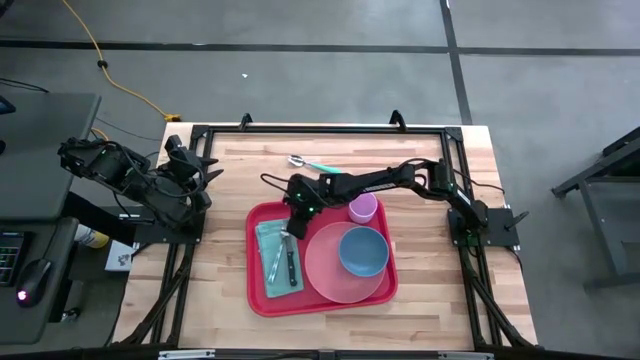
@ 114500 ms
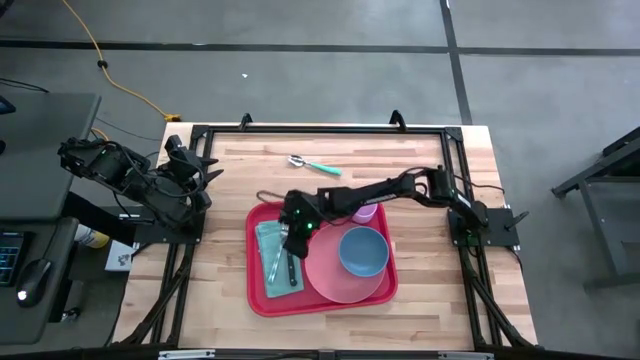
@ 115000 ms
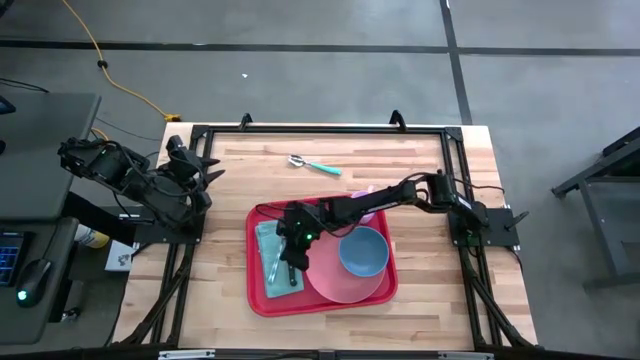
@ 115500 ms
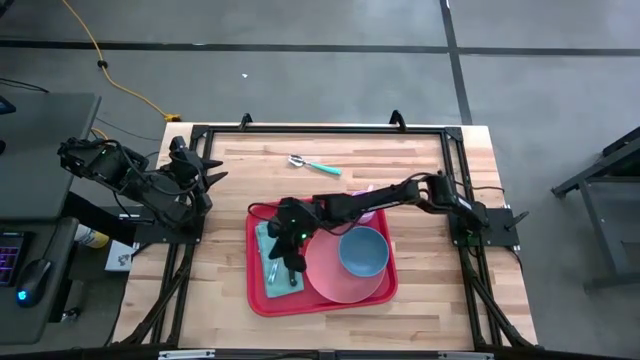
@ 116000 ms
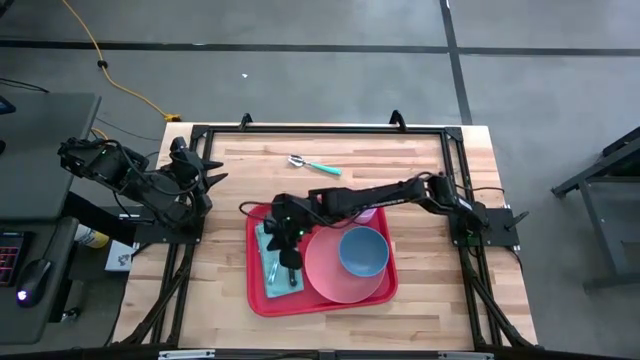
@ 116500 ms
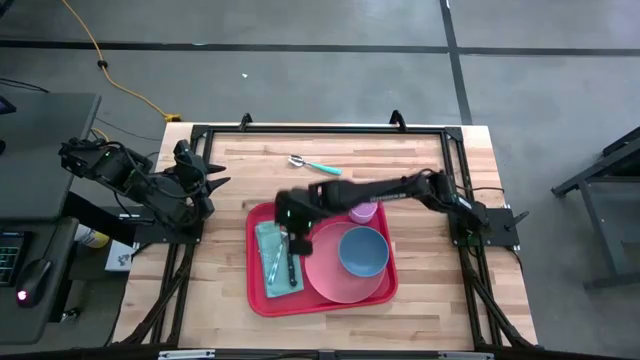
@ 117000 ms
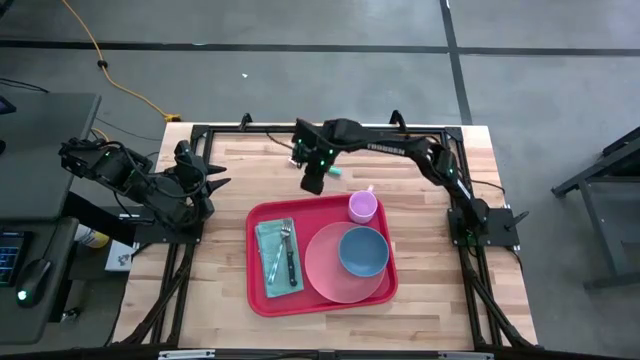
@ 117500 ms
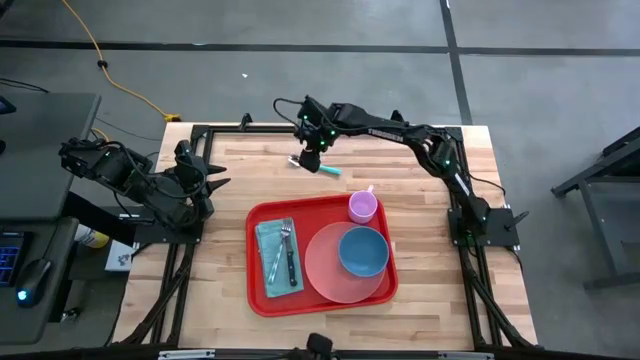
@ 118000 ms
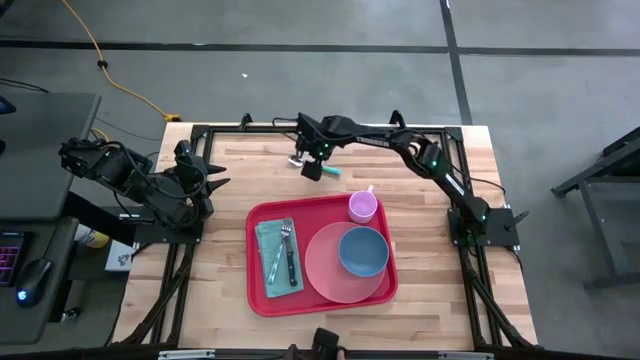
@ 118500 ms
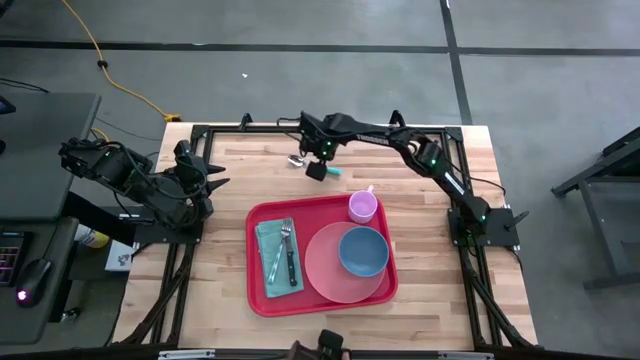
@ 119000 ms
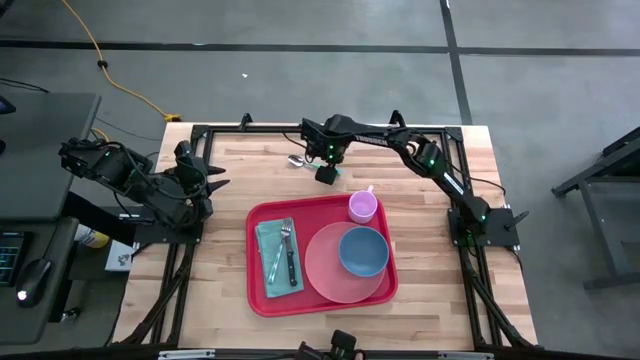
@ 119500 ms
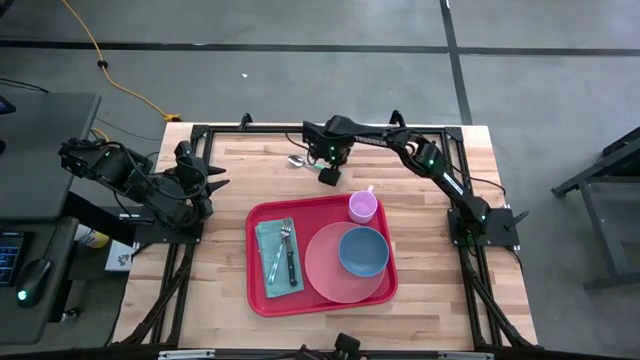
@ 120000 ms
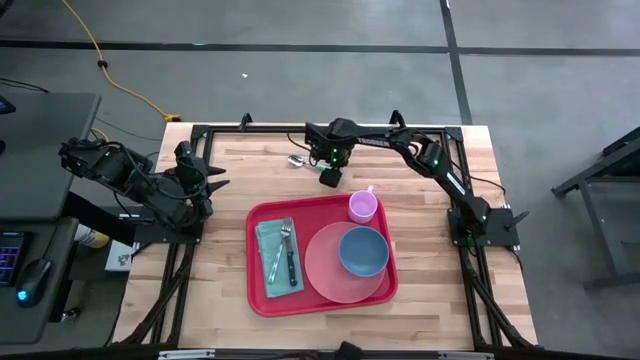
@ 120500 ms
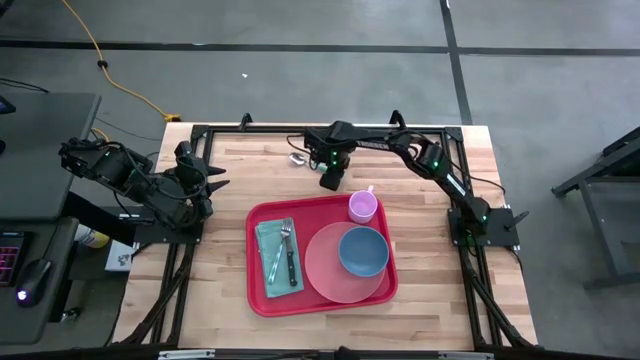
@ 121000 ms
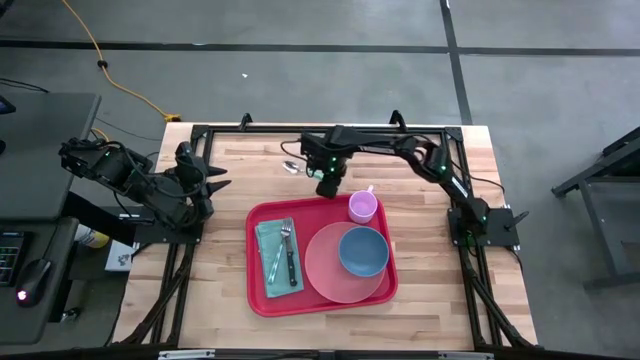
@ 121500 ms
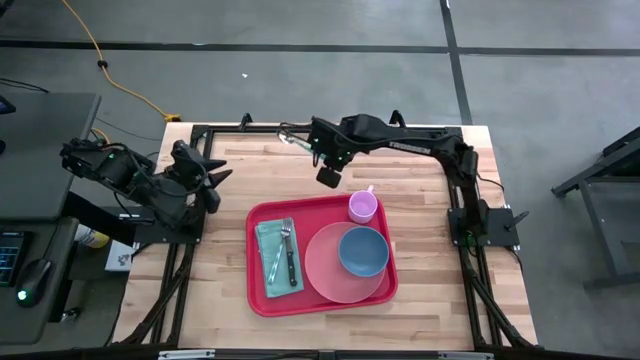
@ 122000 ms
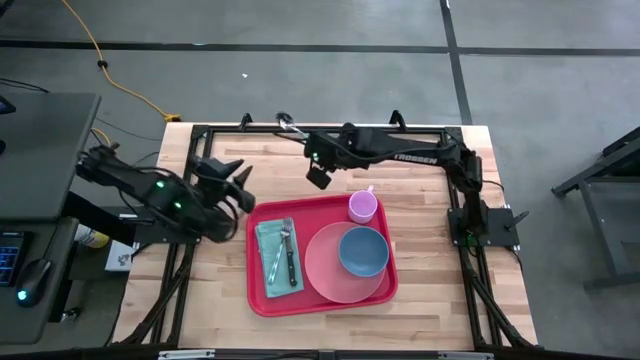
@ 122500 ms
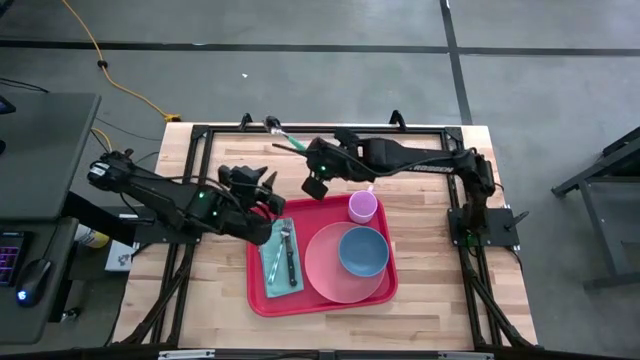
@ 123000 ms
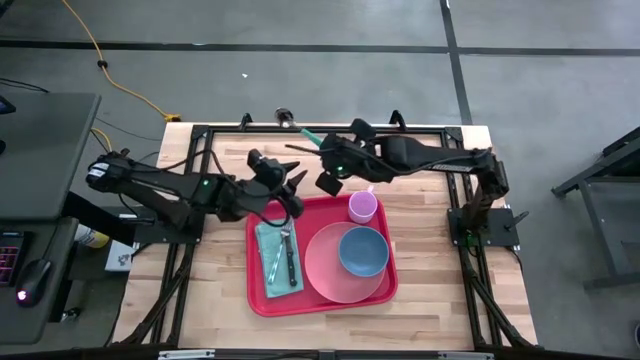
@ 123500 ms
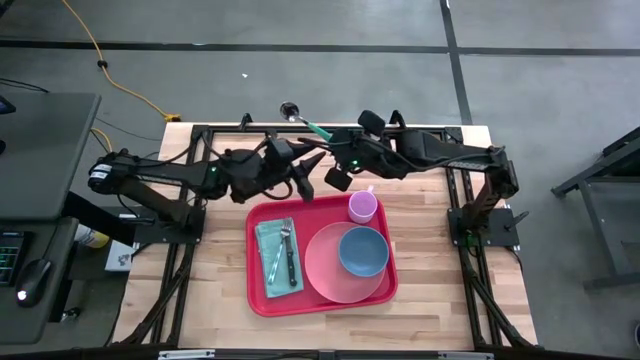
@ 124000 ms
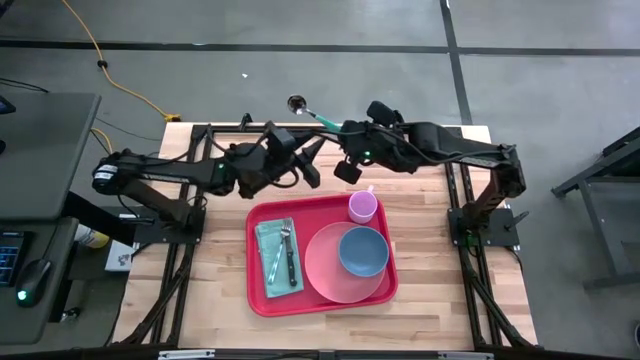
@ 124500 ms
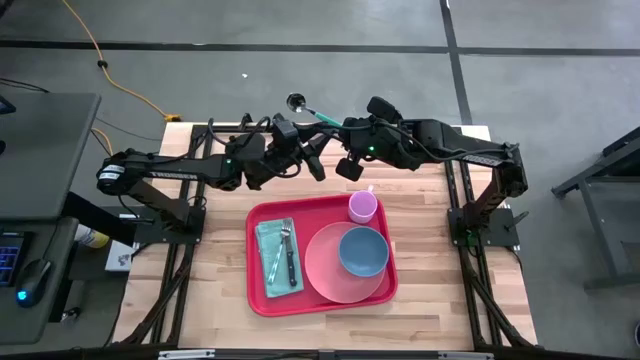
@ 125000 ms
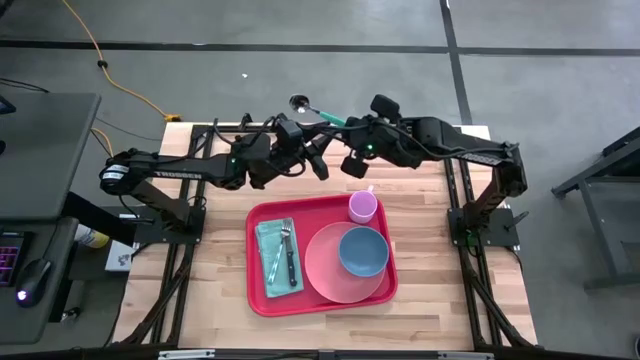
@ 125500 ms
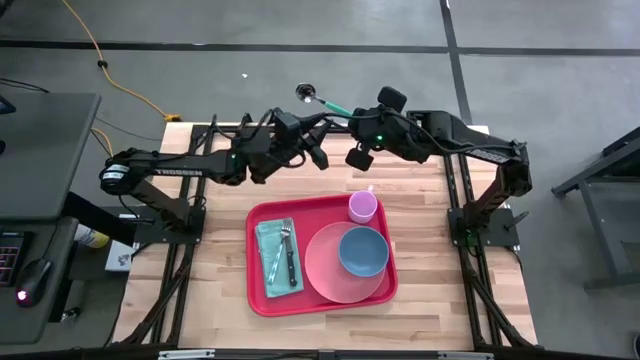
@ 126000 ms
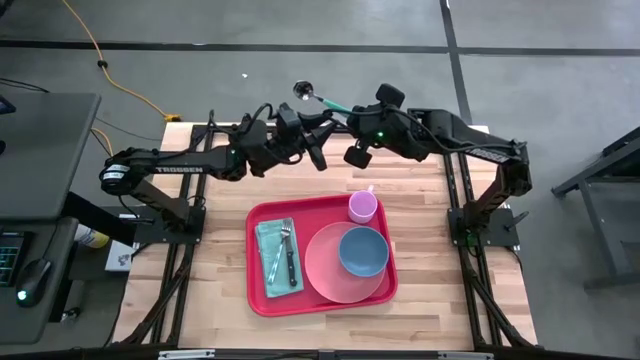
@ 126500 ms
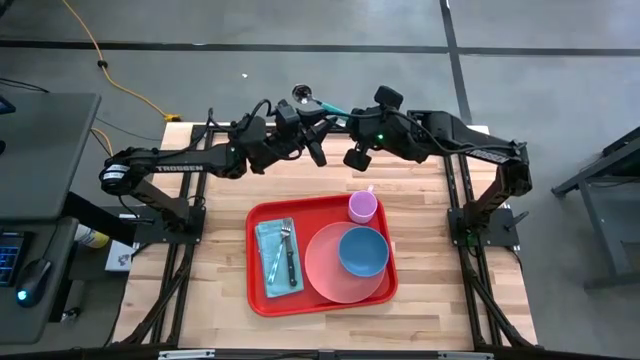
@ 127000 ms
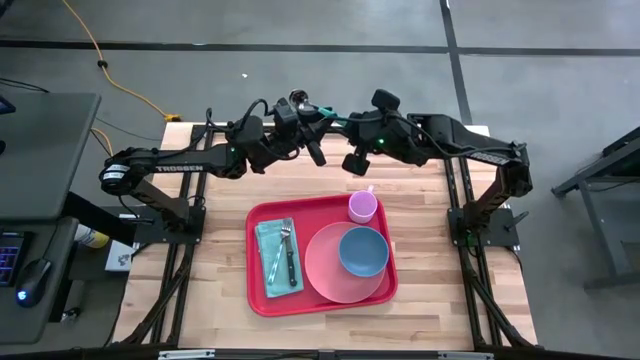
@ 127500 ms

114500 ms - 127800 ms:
Task: Set up tray
Put the blue spoon on the blue napkin to the left of the blue fork

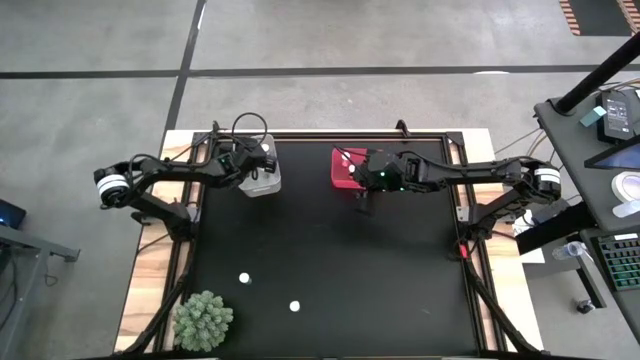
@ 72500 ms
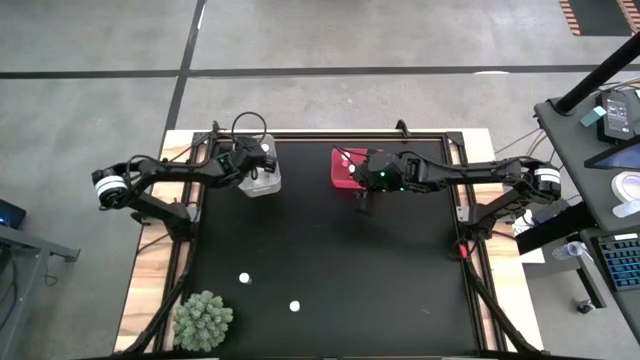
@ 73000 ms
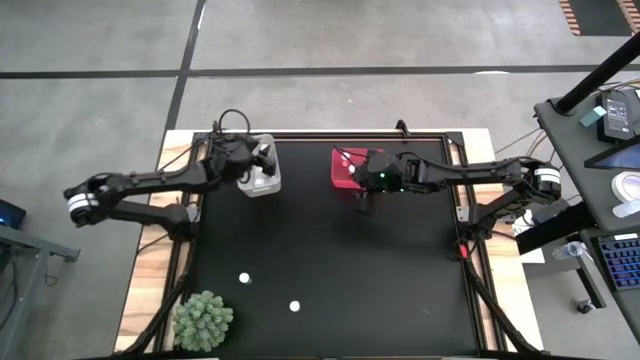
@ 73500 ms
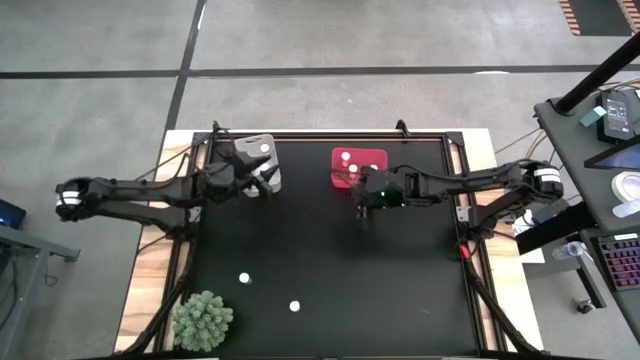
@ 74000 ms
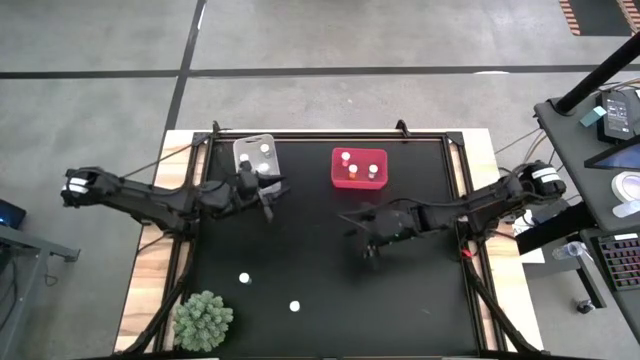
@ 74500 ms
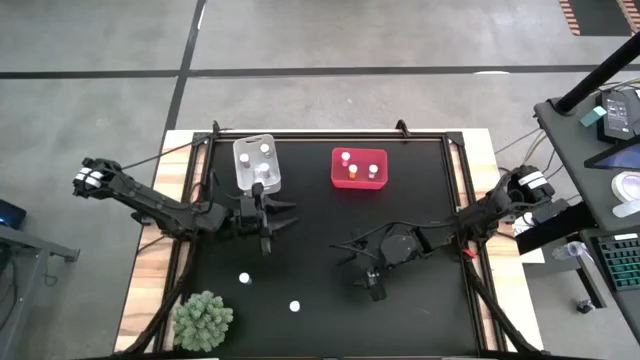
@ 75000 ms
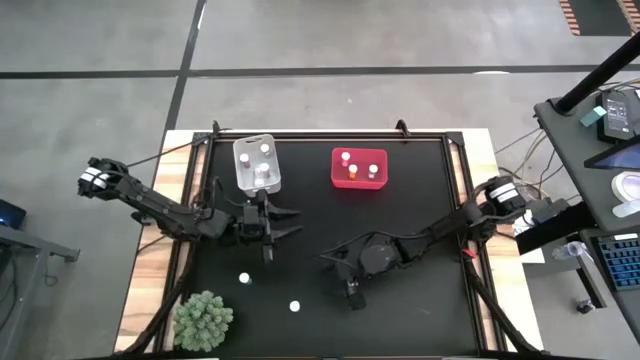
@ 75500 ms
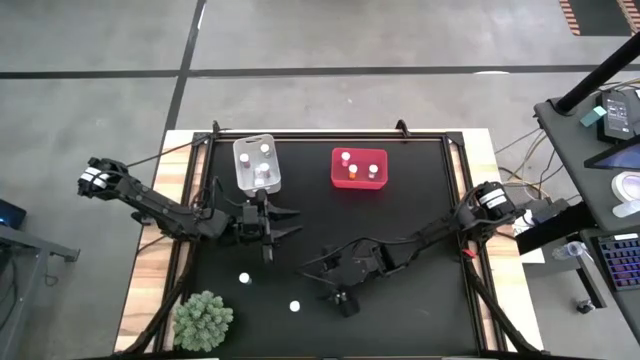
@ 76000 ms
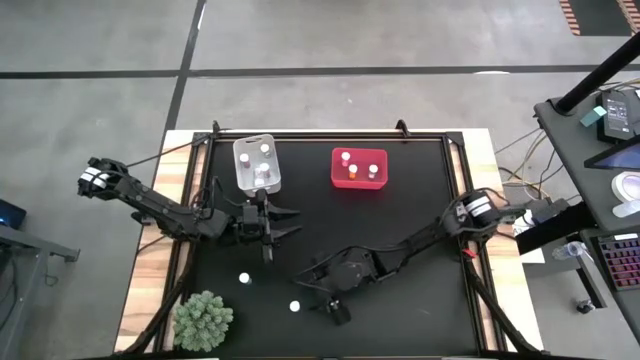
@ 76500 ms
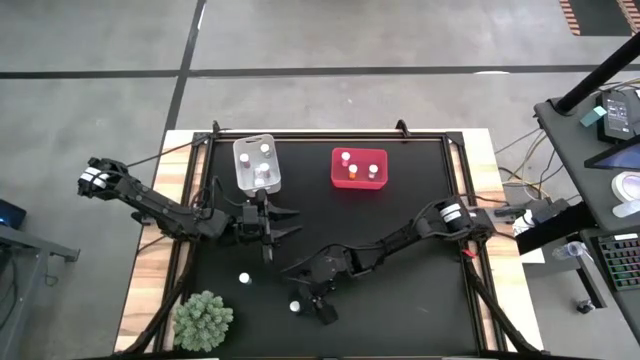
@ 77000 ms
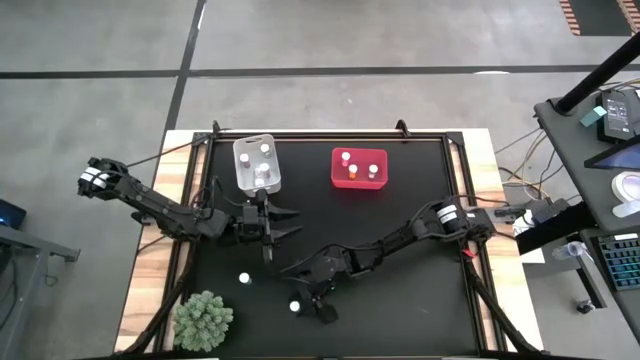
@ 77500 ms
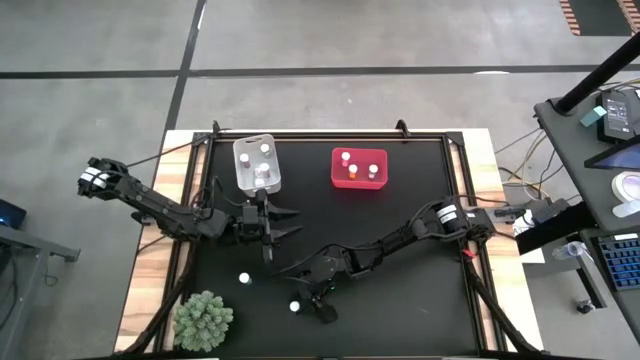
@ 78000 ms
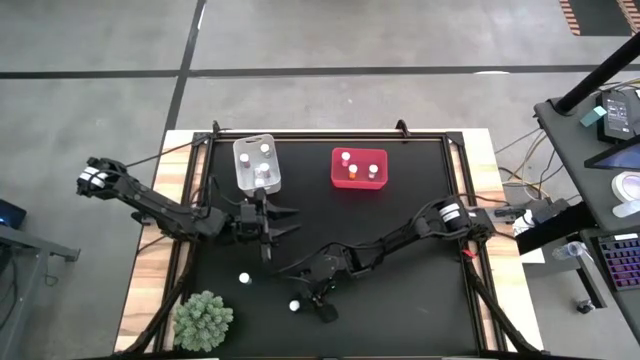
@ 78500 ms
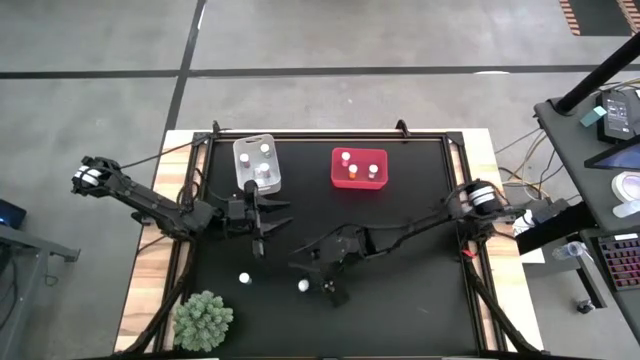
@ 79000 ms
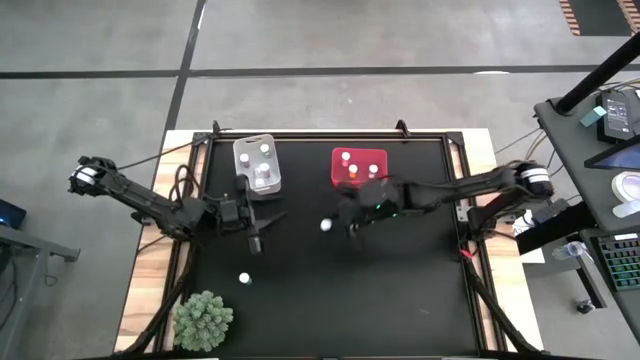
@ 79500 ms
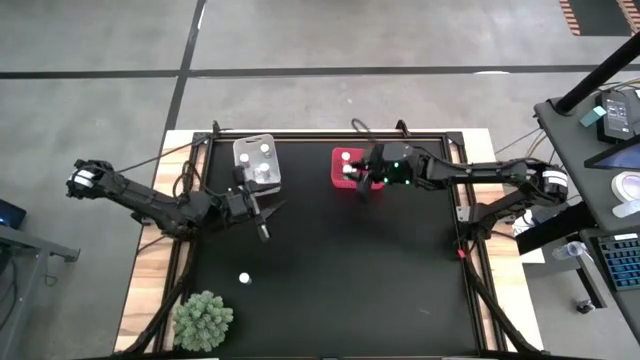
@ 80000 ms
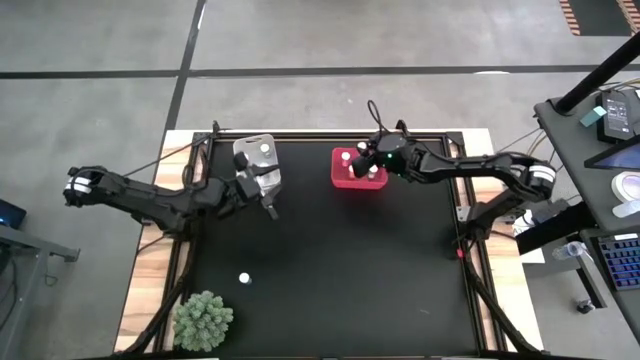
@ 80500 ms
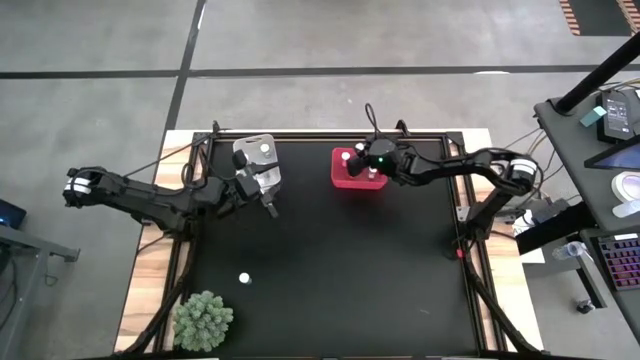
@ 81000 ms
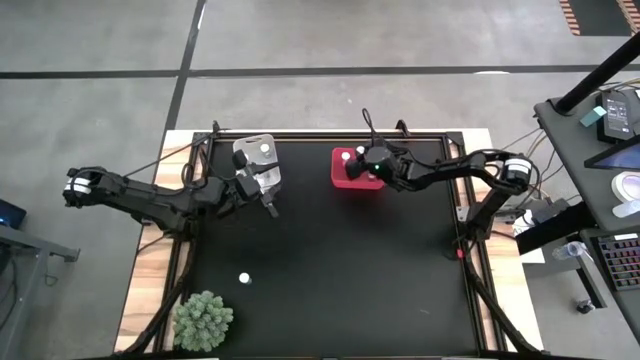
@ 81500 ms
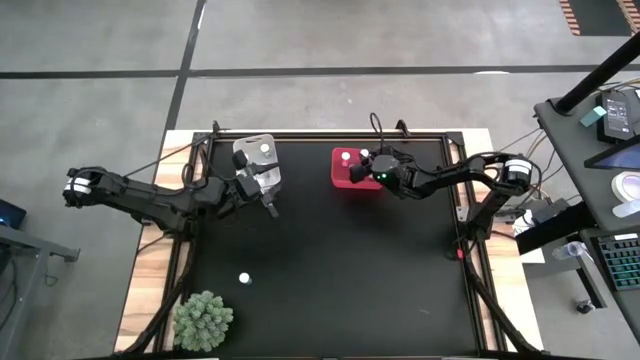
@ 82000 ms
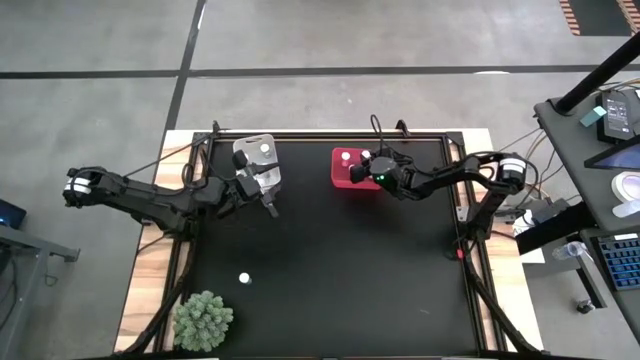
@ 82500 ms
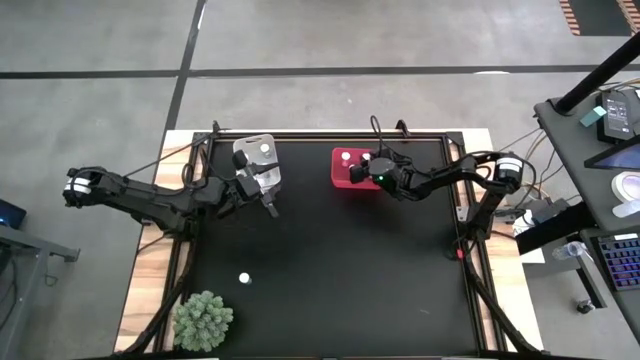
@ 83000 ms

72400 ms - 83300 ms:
Task: Pick and place medicine bottles into bin by pill shape (circle, oval)
Put the blue tablet bottle into the red bin
